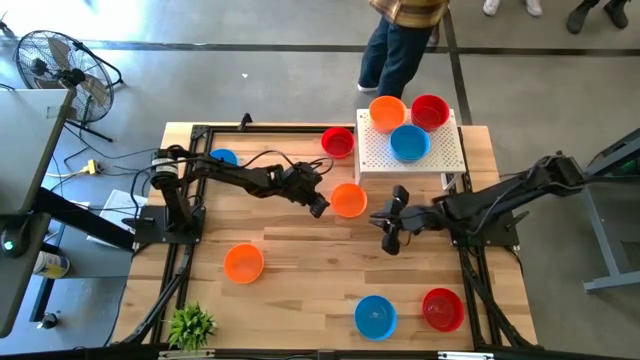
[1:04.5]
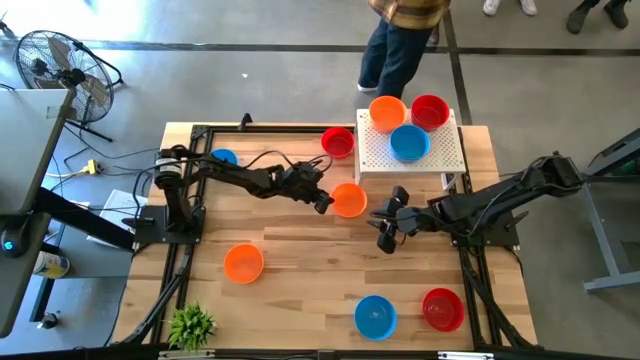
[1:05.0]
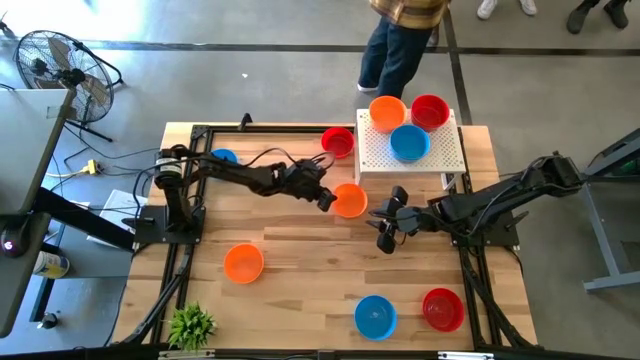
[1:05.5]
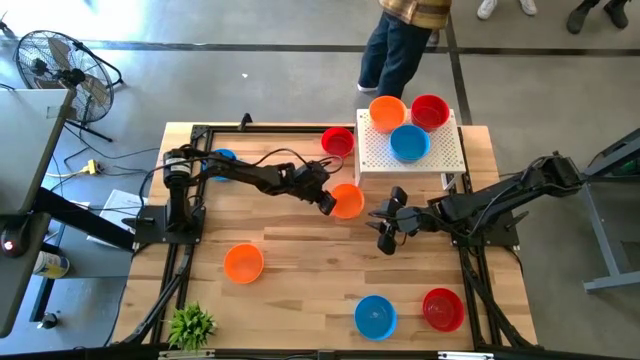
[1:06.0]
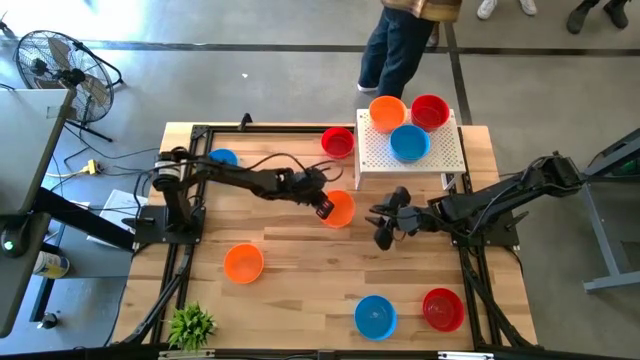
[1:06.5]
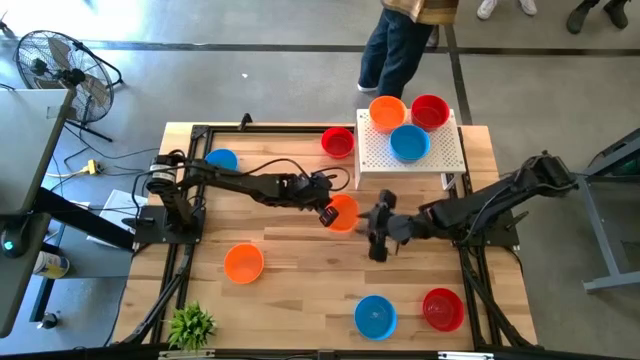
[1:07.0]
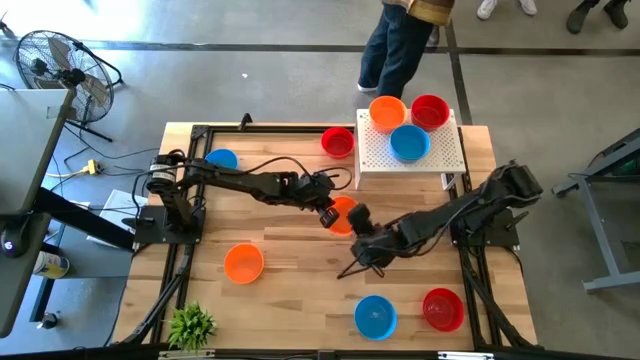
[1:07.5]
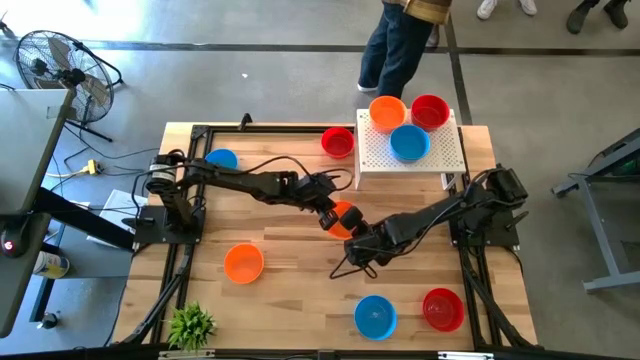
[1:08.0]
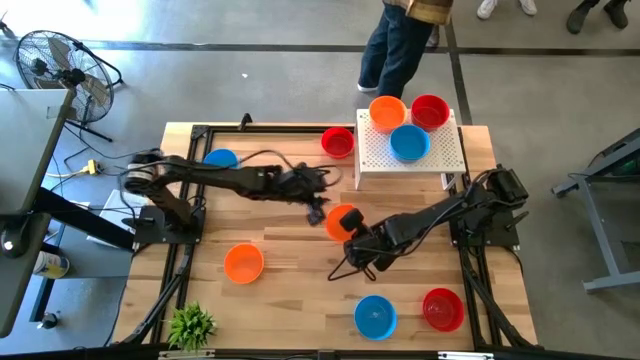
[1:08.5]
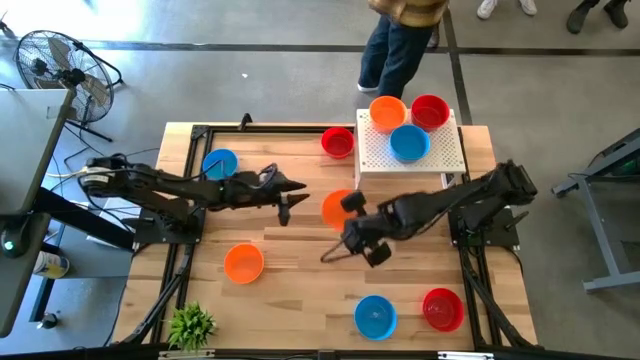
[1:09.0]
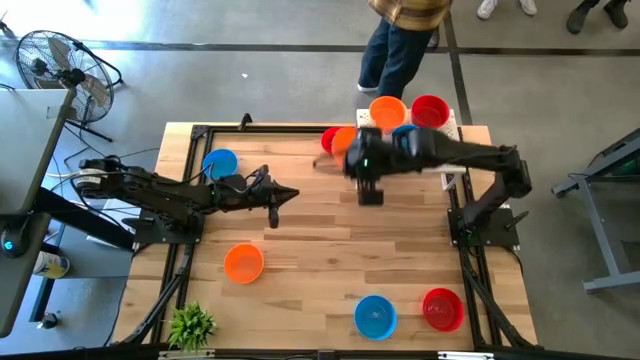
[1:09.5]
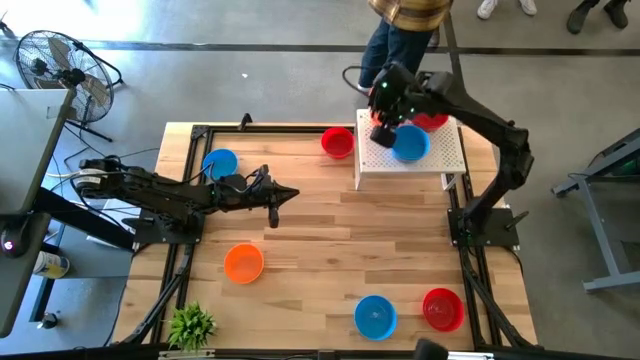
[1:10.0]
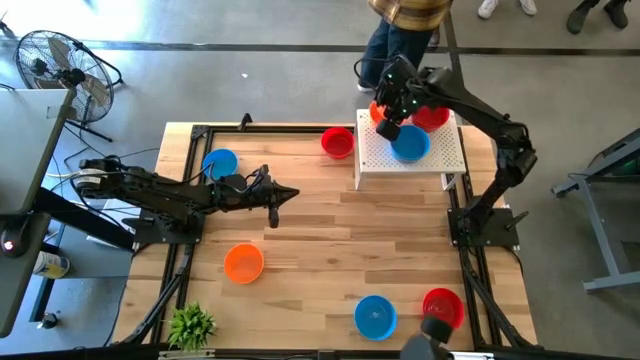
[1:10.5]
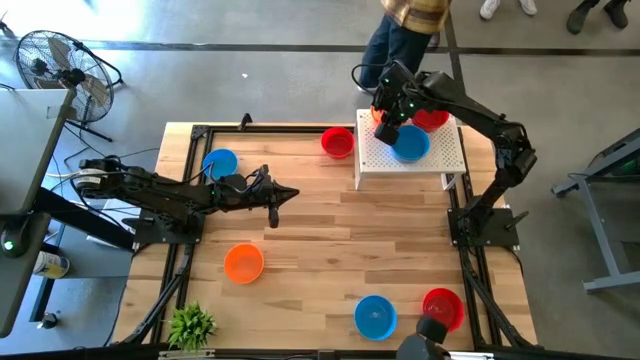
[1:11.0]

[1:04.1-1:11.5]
Task: Pick & Place Mini bowls
Stack the orange bowl on the stacked orange bowls on the shelf

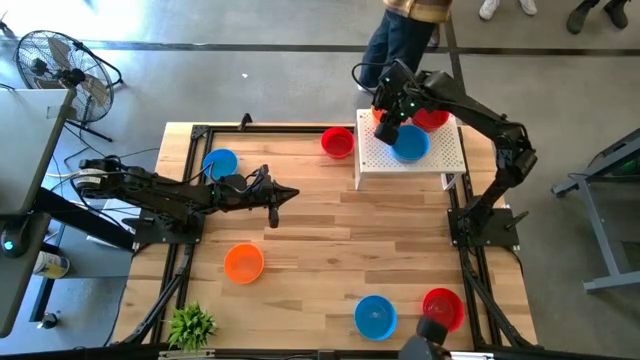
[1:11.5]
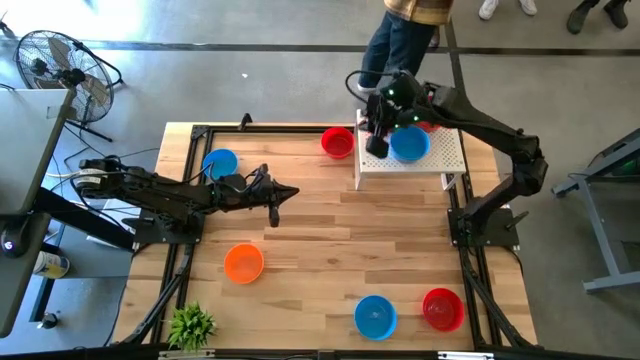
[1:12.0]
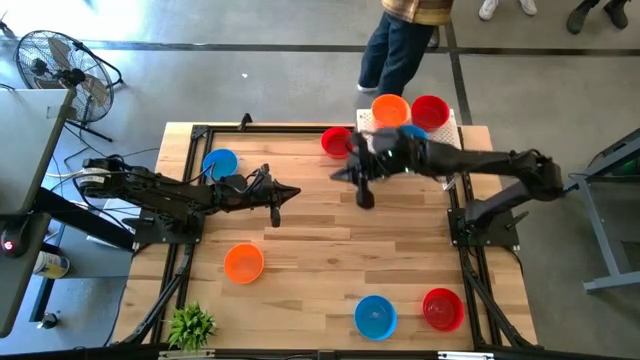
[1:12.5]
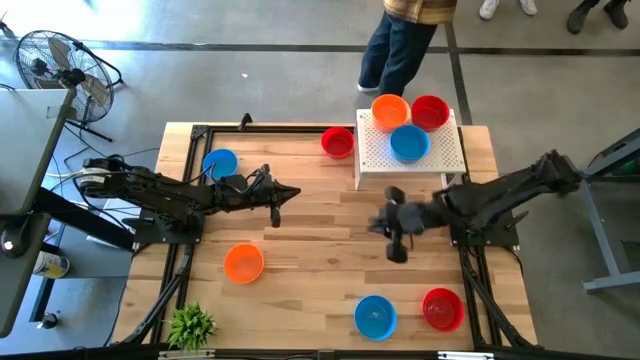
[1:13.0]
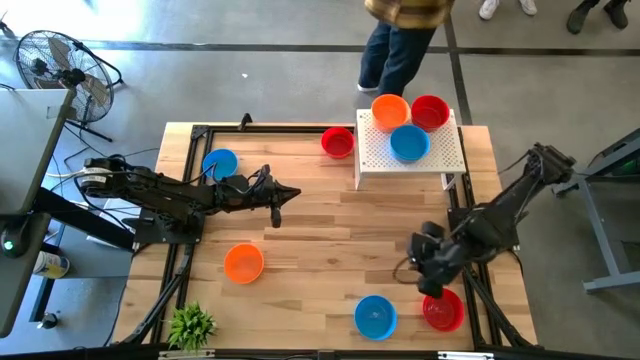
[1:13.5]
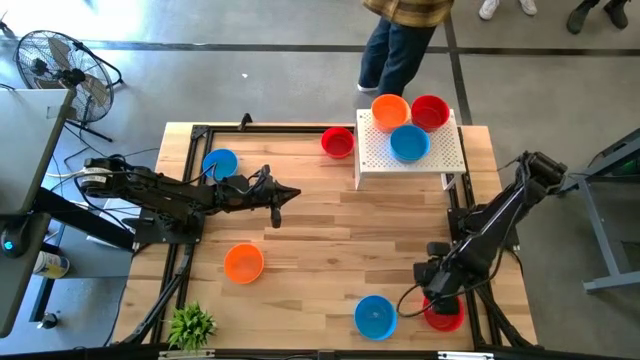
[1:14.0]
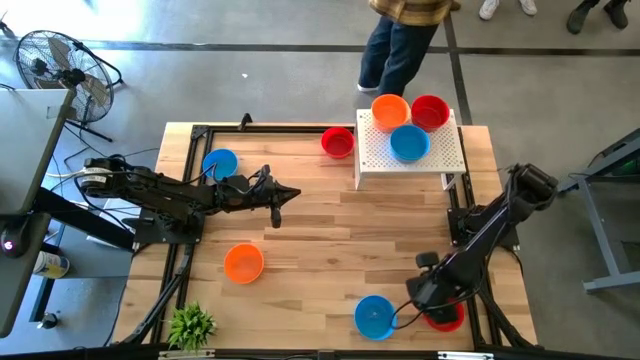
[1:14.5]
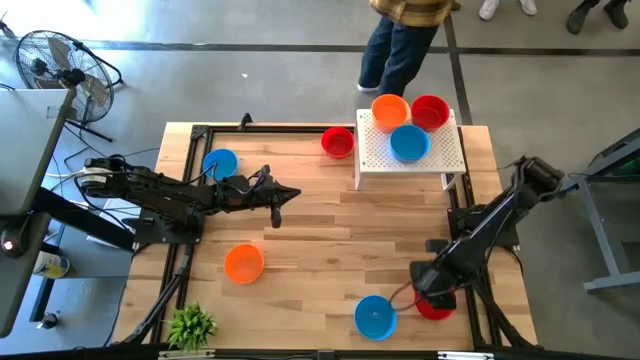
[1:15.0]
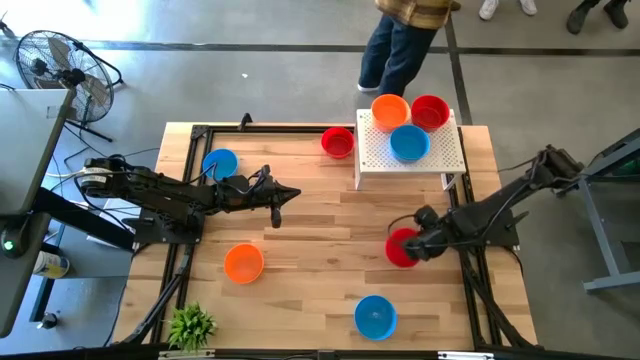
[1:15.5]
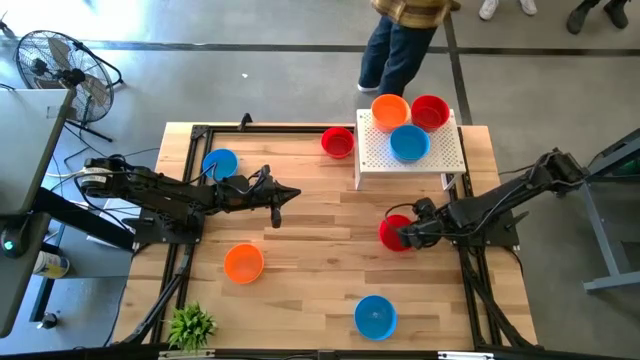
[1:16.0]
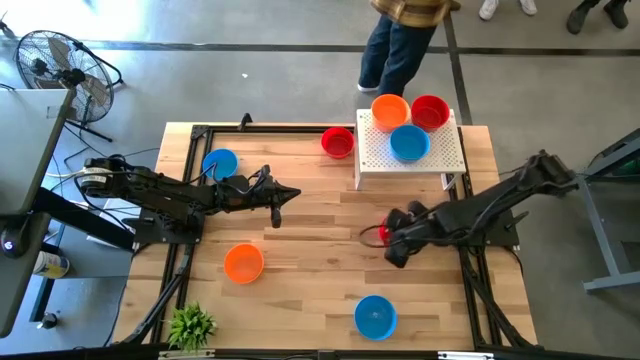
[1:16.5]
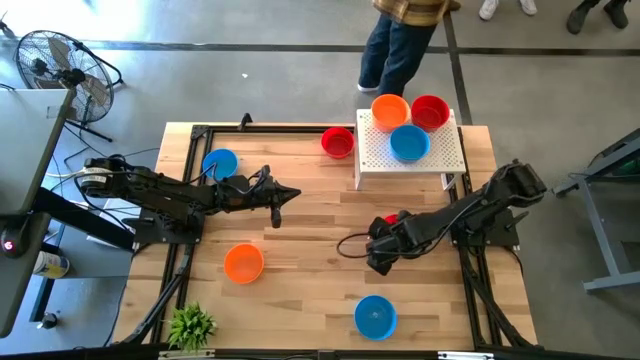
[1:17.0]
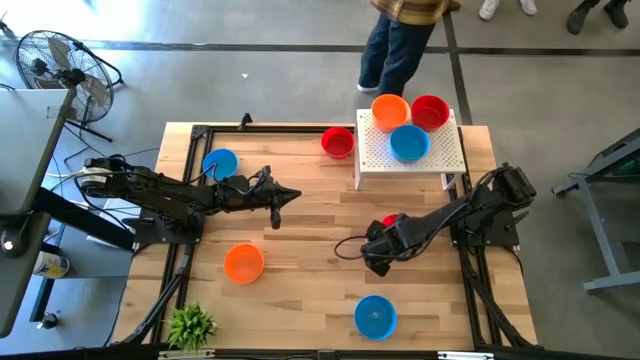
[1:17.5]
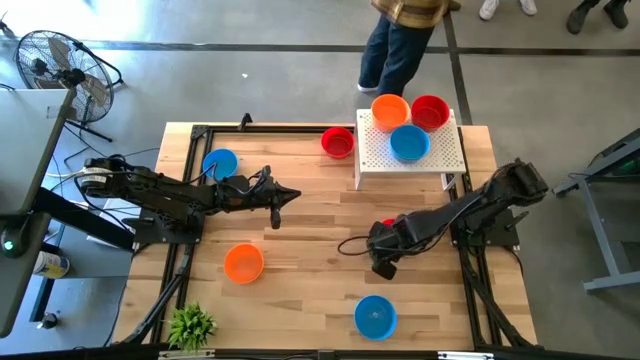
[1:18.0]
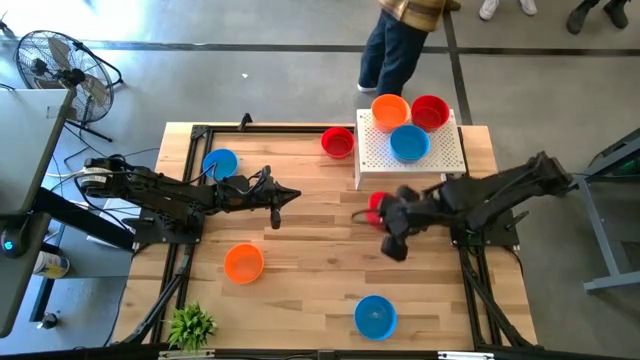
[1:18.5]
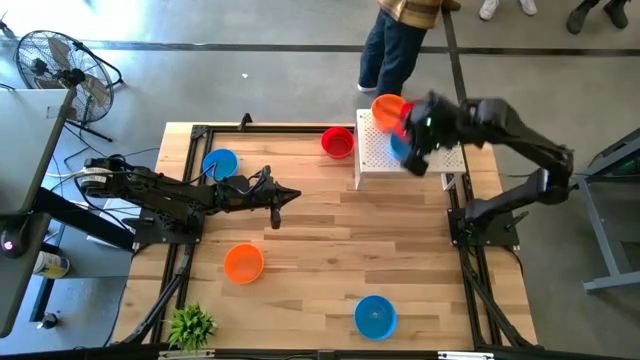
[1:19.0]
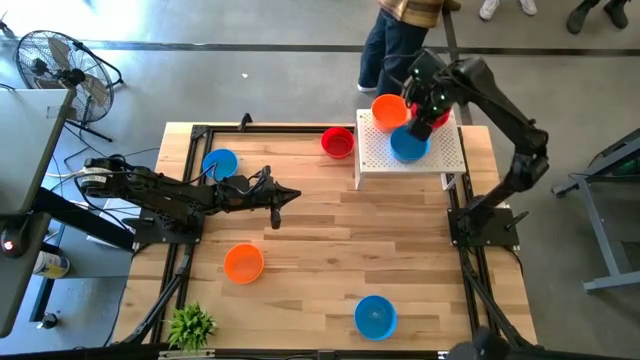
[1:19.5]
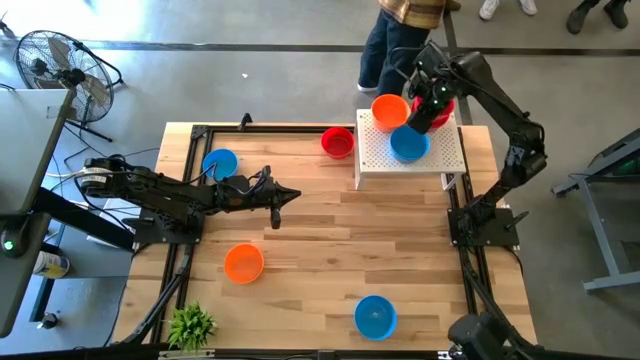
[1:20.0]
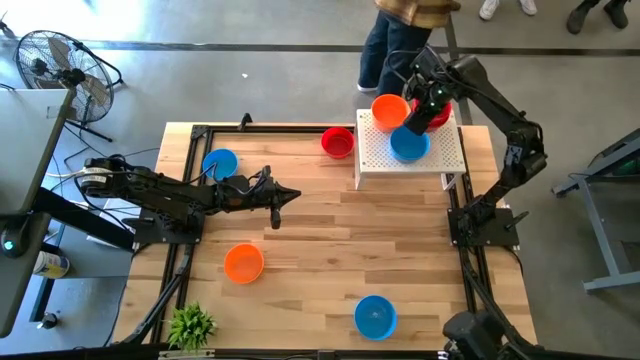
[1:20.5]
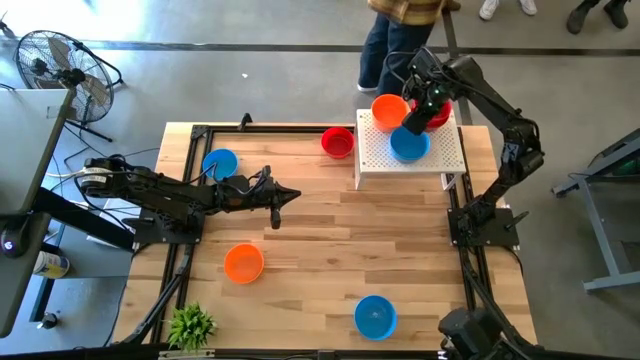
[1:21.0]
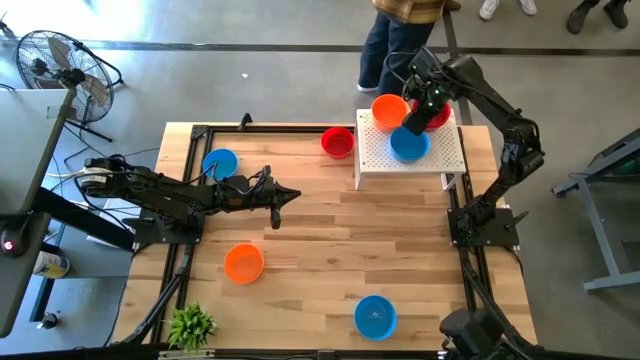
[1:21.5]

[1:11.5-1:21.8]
Stack the red bowl on the stacked red bowls on the shelf

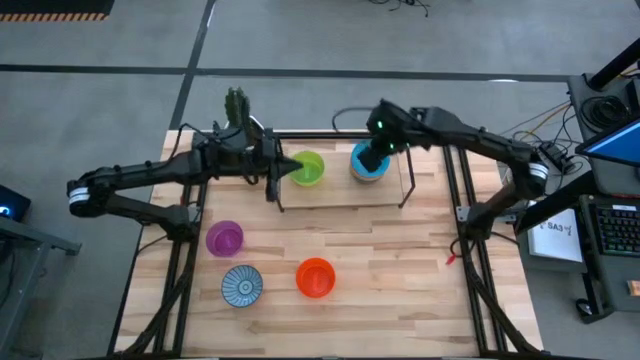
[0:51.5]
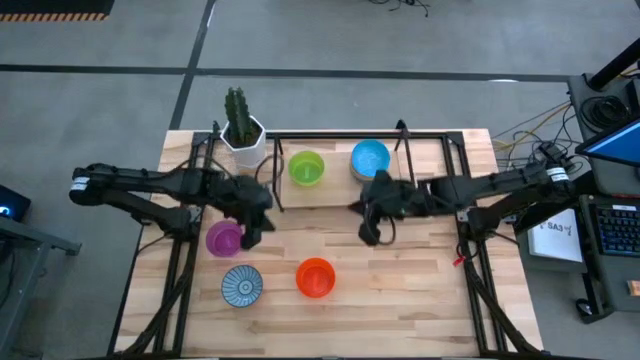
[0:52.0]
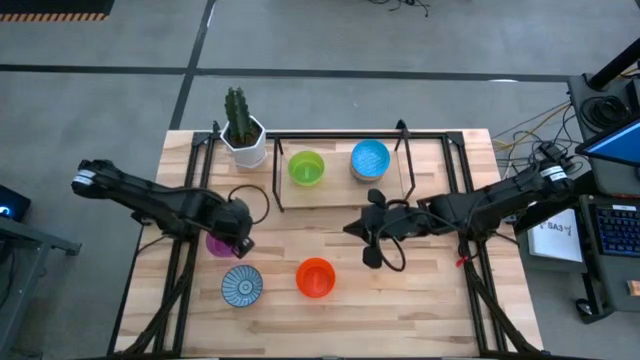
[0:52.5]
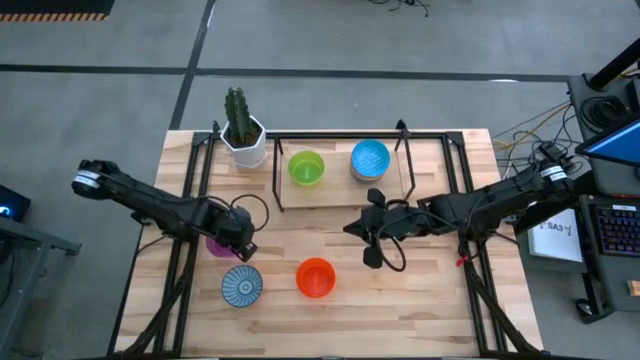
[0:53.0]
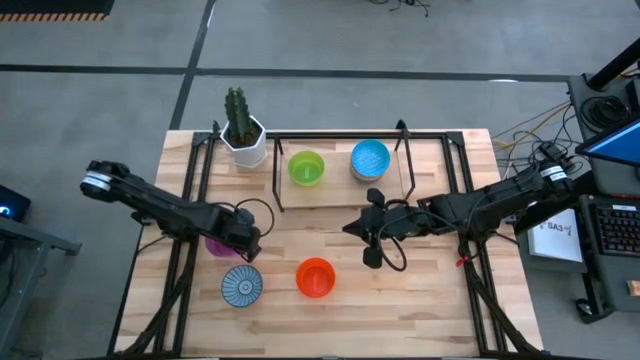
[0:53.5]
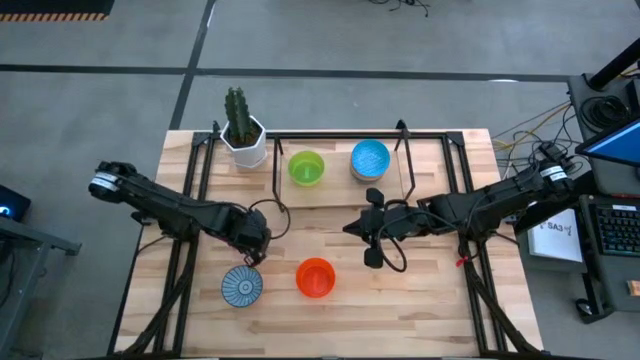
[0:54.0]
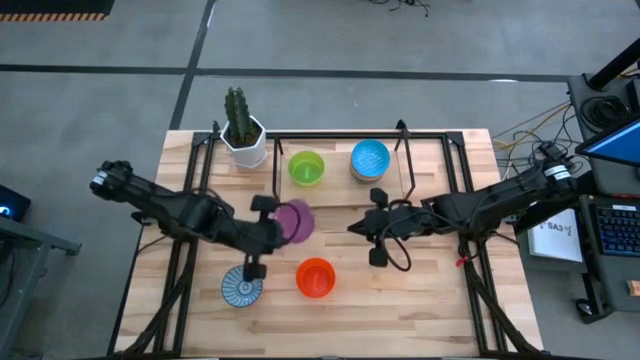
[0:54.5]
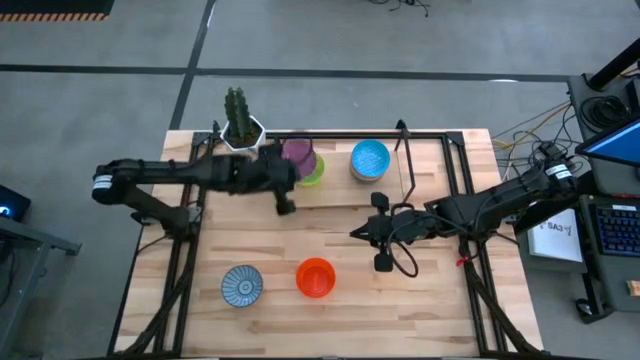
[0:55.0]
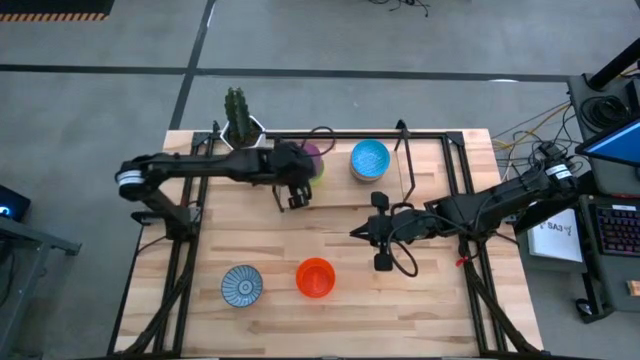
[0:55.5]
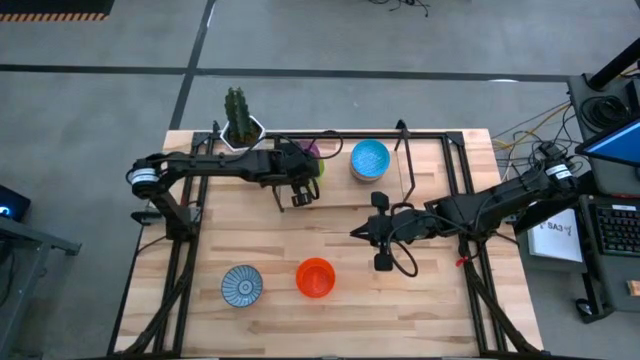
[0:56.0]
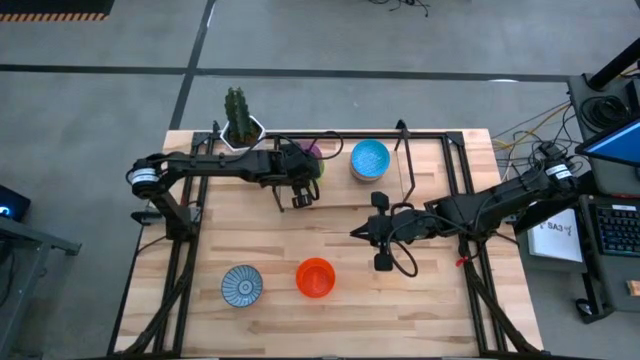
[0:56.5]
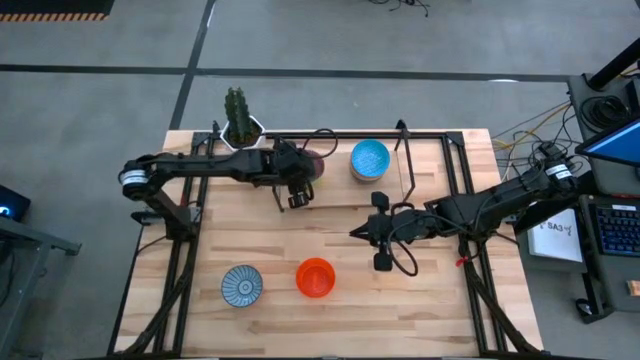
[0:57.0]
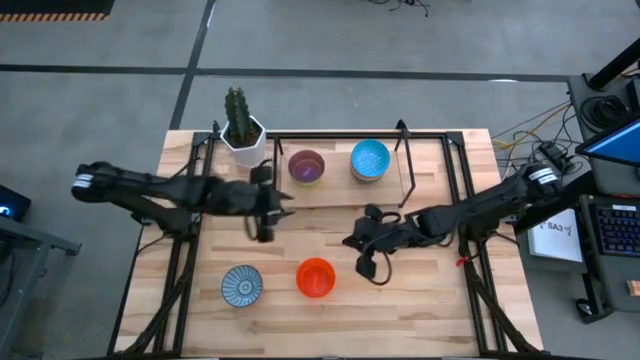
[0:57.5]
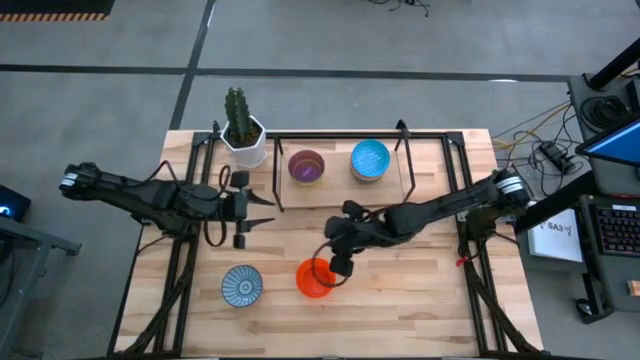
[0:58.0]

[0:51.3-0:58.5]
Task: Place and stack bowls onto a shelf
Stack the purple bowl on the green bowl
